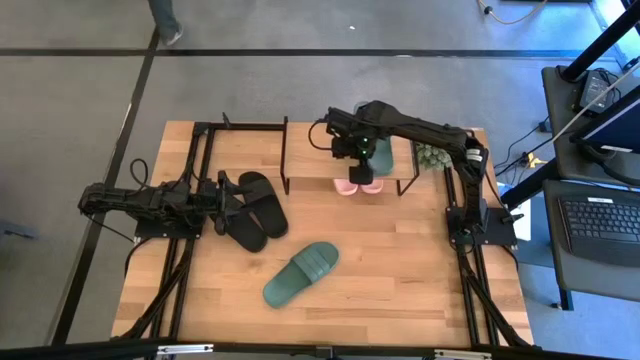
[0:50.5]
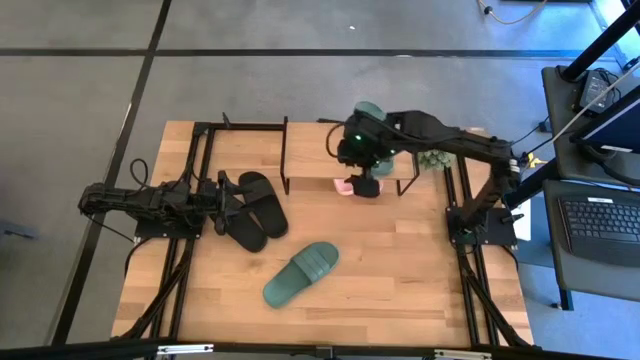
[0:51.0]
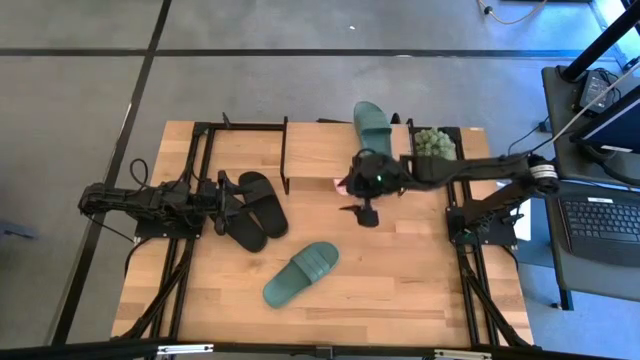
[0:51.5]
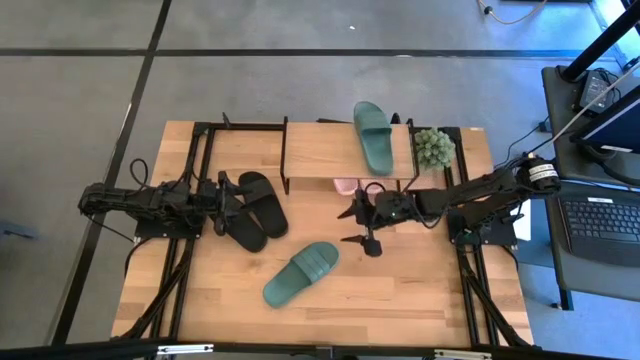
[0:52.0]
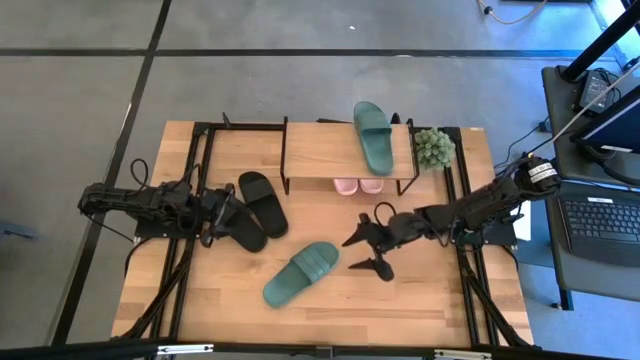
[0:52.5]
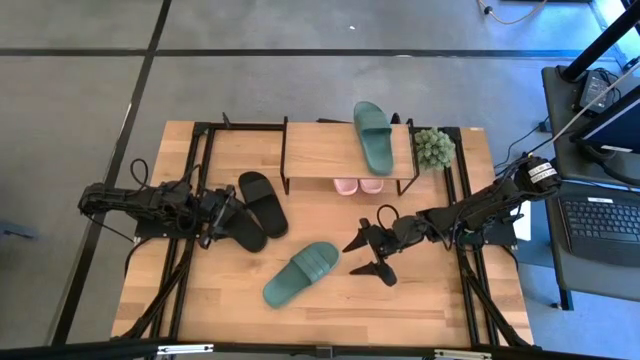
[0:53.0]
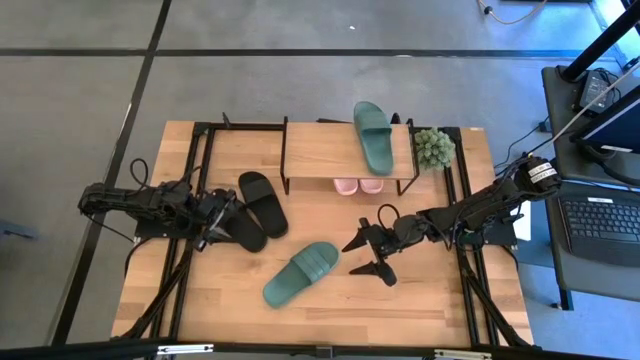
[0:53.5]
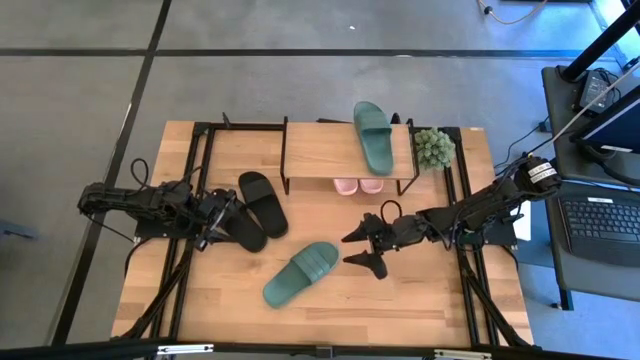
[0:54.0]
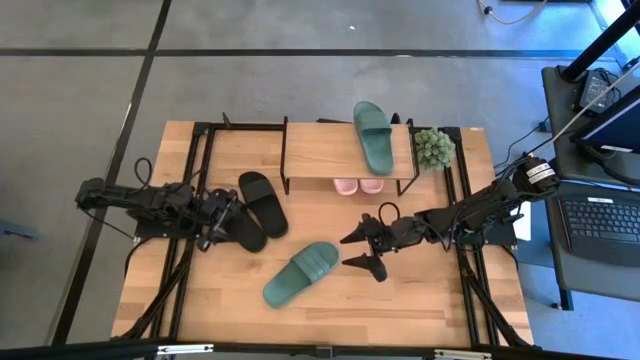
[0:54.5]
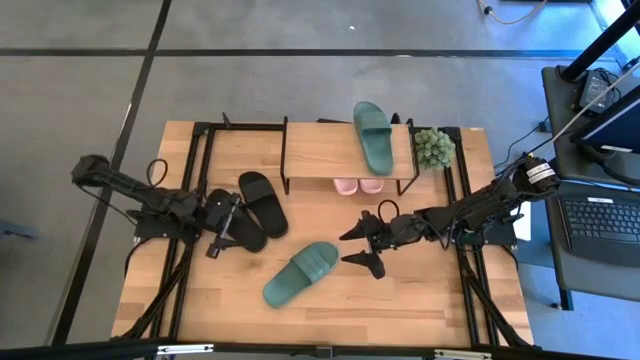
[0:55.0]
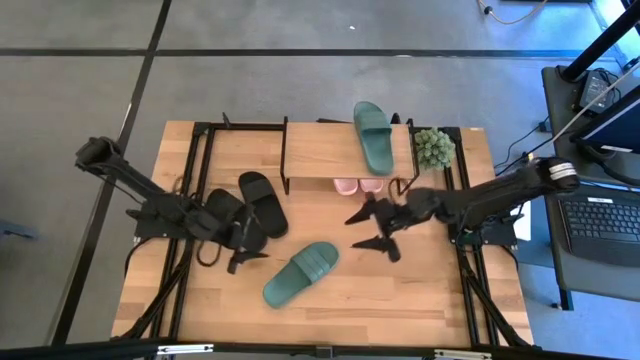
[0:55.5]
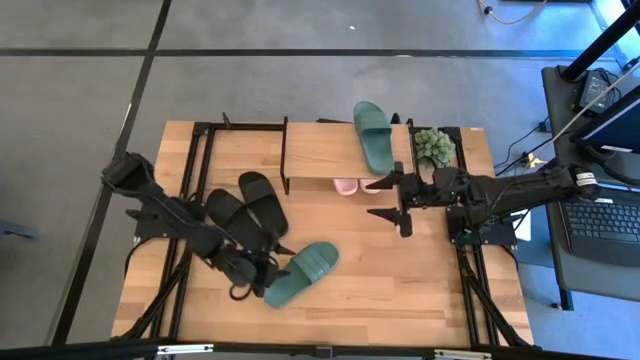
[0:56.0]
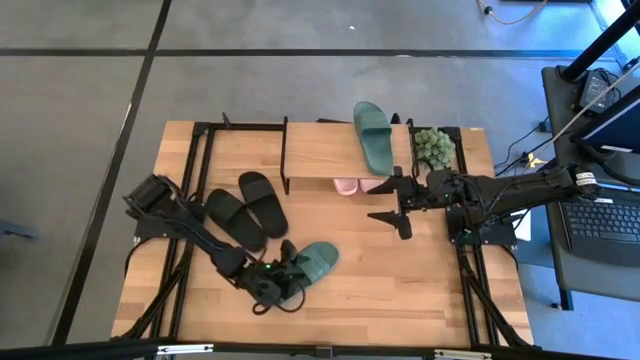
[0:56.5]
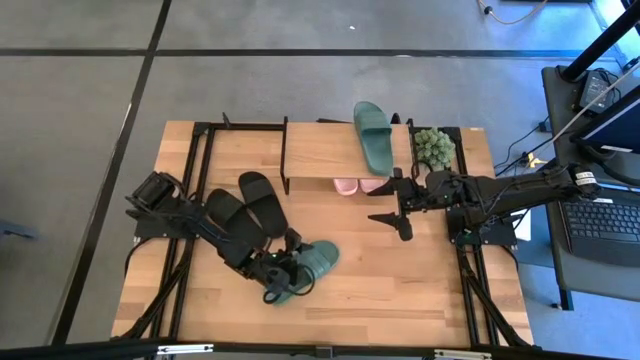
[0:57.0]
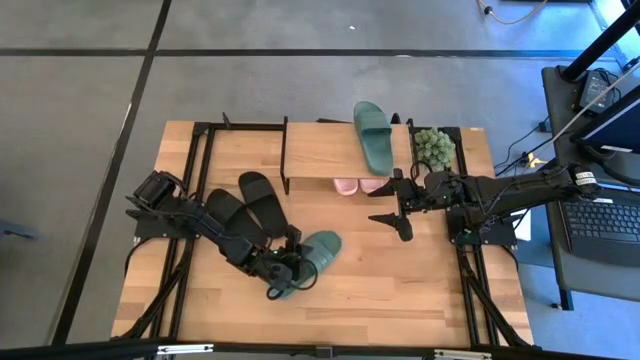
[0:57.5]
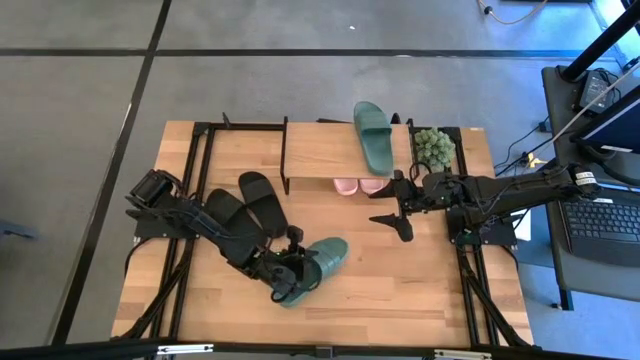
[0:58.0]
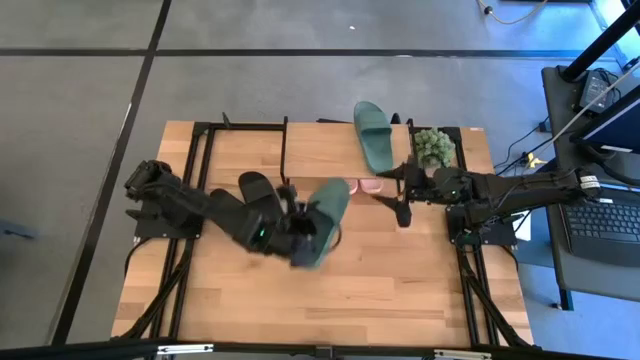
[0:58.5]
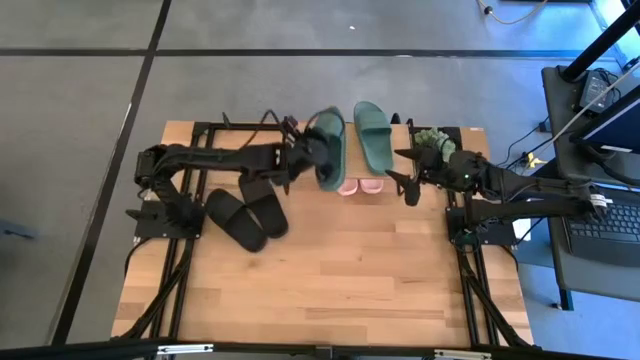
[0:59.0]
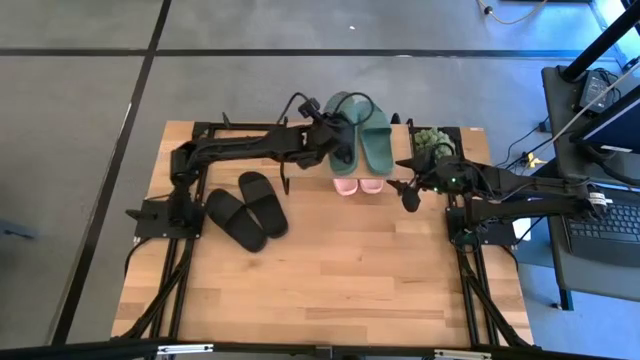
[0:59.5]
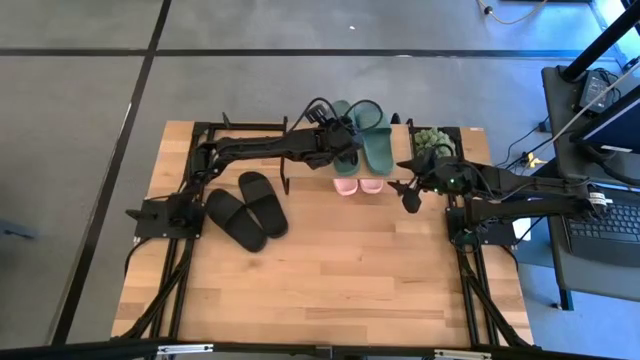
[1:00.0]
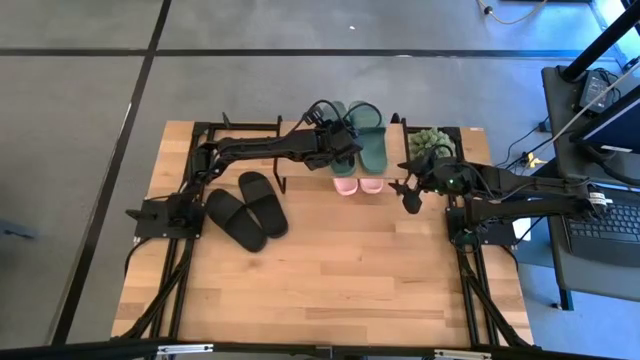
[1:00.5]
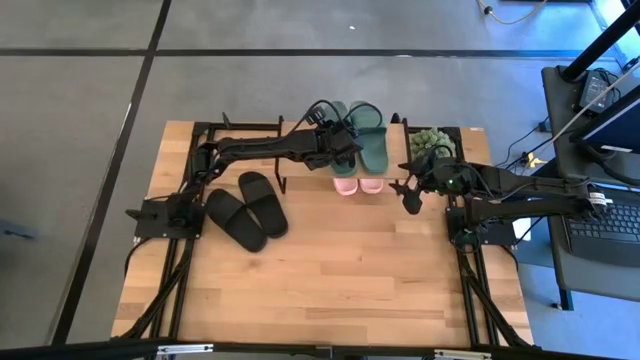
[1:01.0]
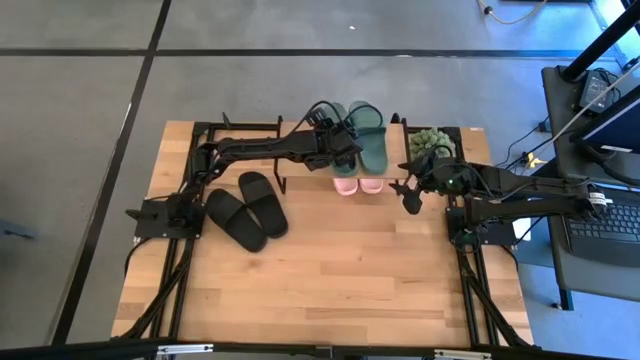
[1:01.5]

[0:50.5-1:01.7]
Task: Pick and place slides into the shelf
Put the green slide on the shelf
